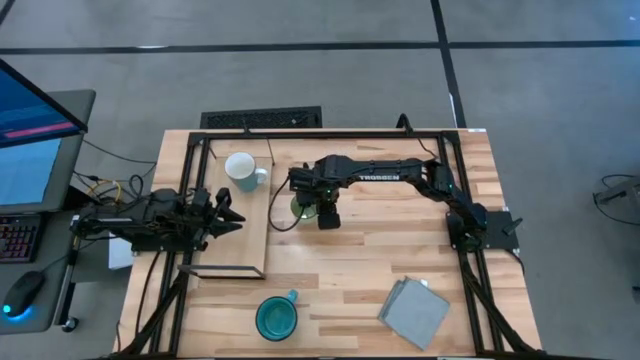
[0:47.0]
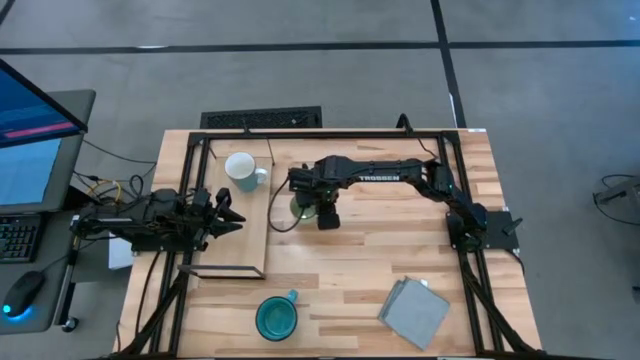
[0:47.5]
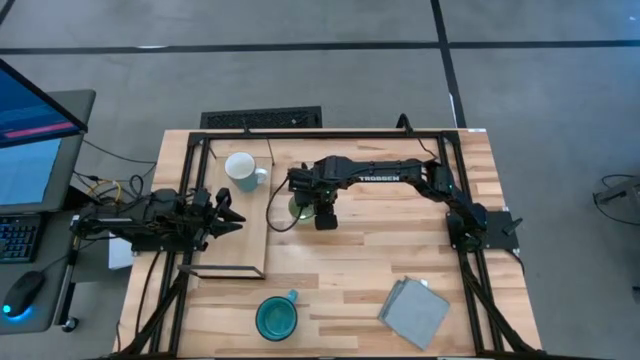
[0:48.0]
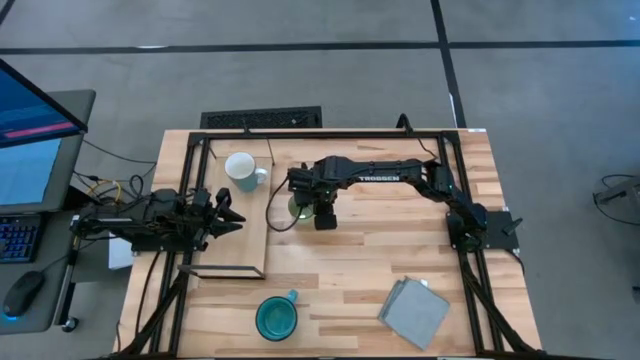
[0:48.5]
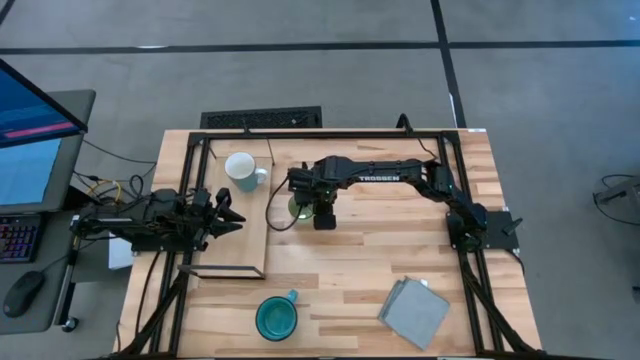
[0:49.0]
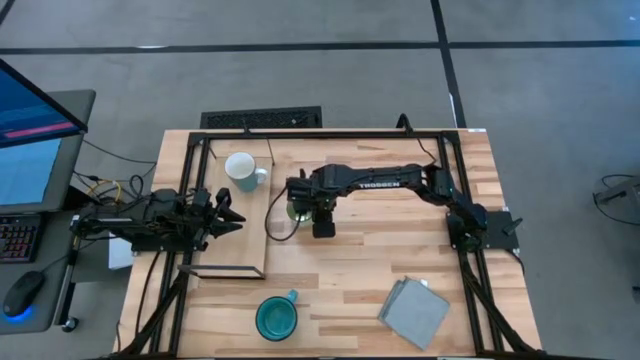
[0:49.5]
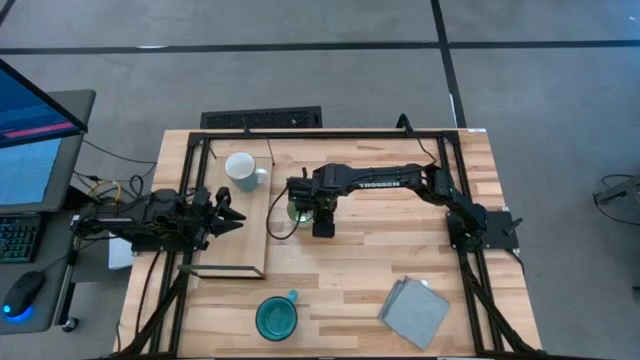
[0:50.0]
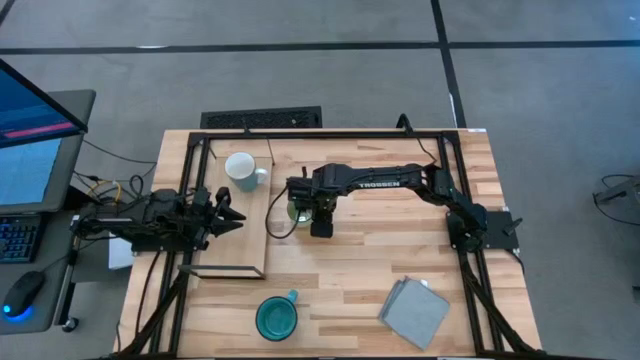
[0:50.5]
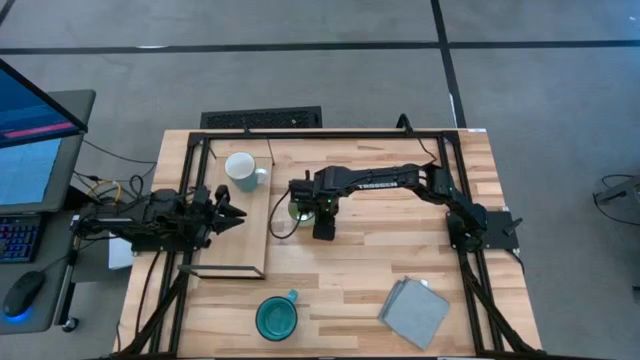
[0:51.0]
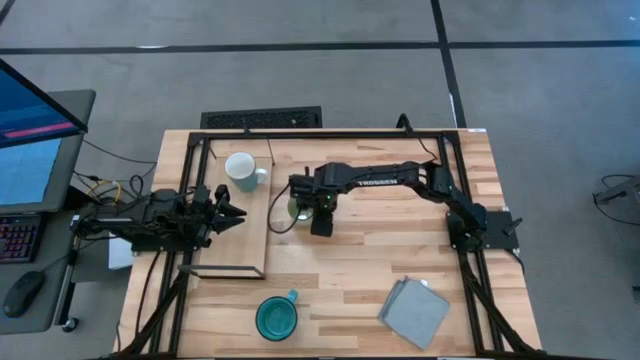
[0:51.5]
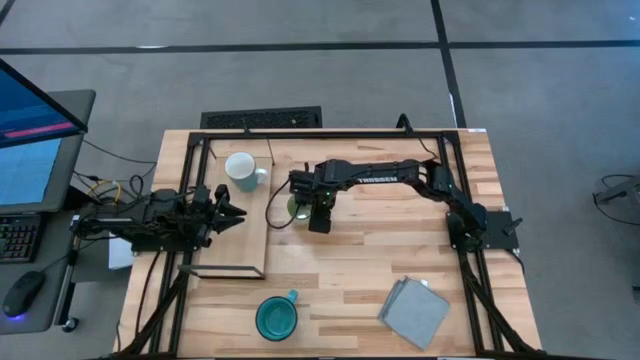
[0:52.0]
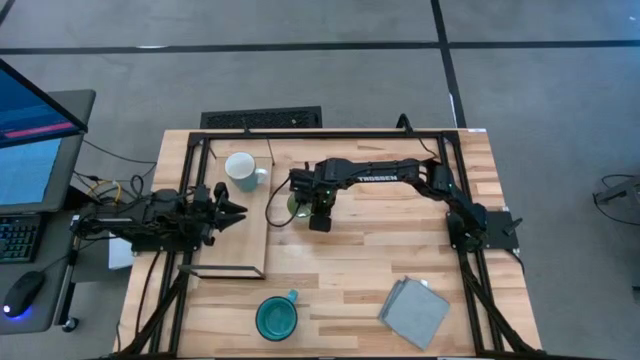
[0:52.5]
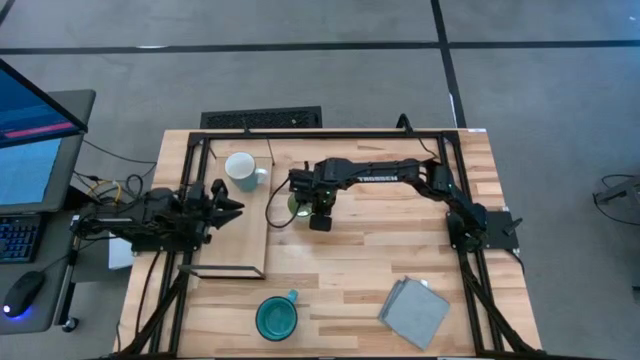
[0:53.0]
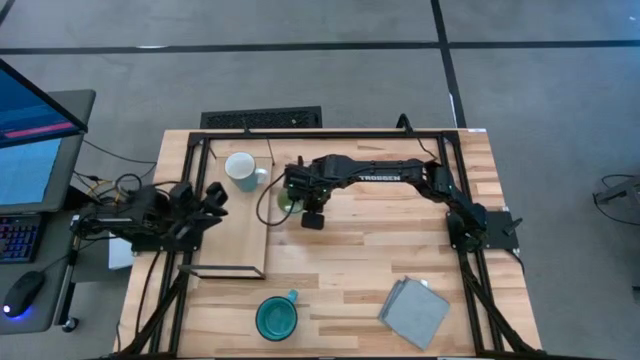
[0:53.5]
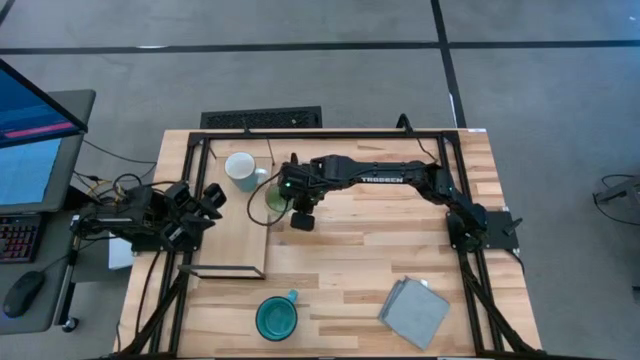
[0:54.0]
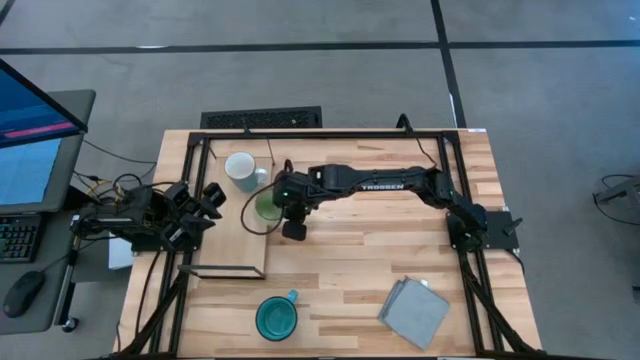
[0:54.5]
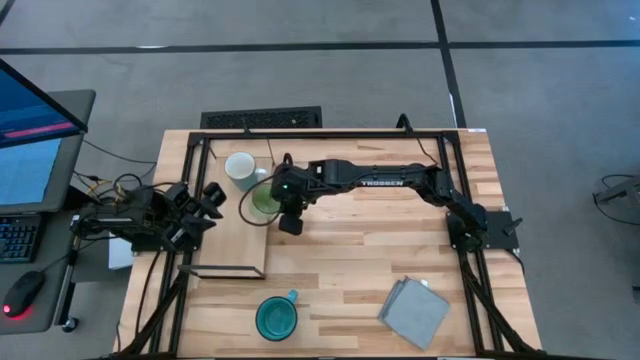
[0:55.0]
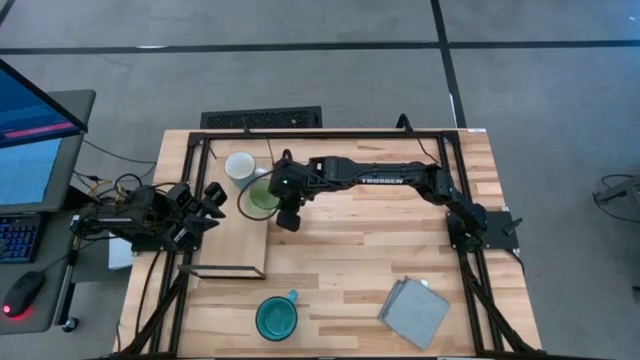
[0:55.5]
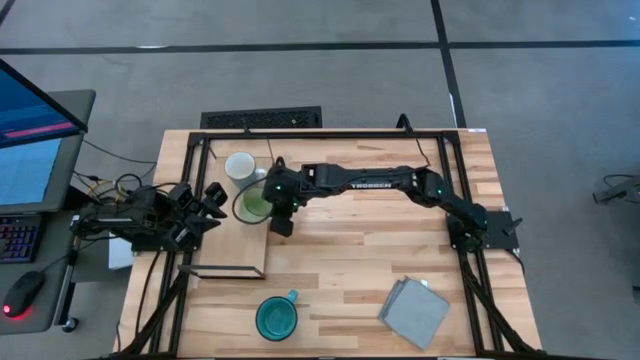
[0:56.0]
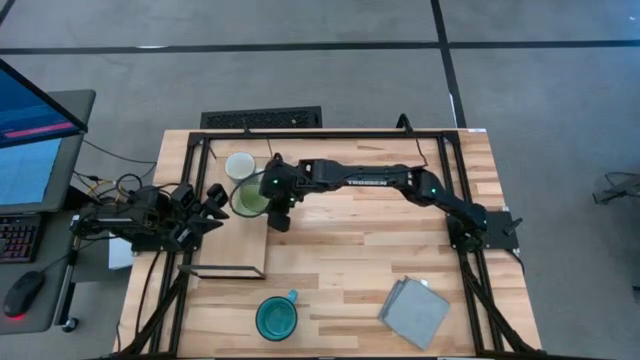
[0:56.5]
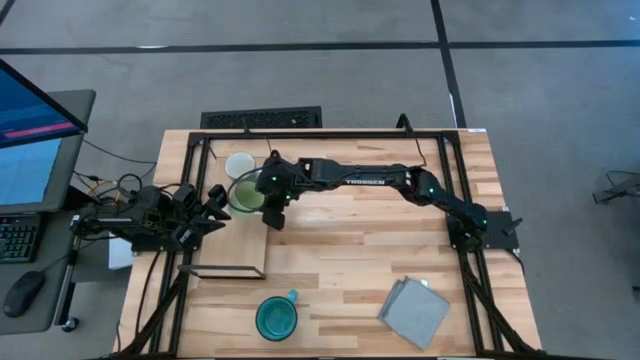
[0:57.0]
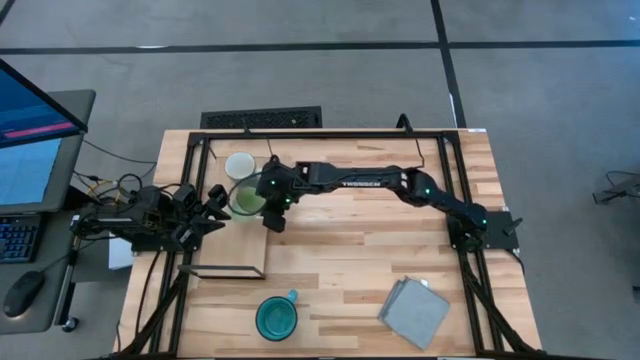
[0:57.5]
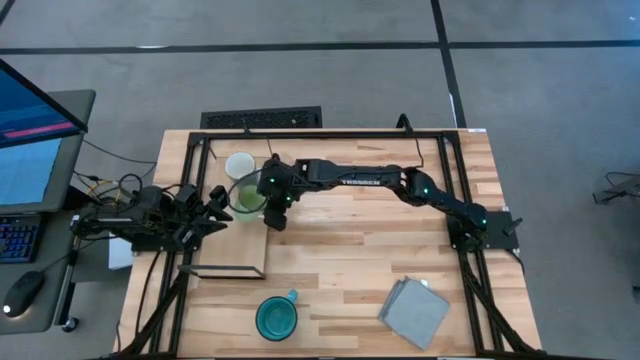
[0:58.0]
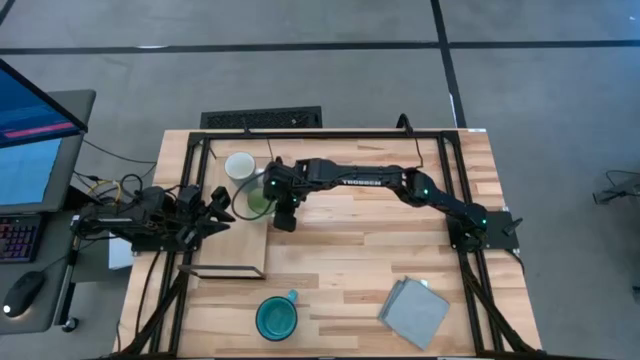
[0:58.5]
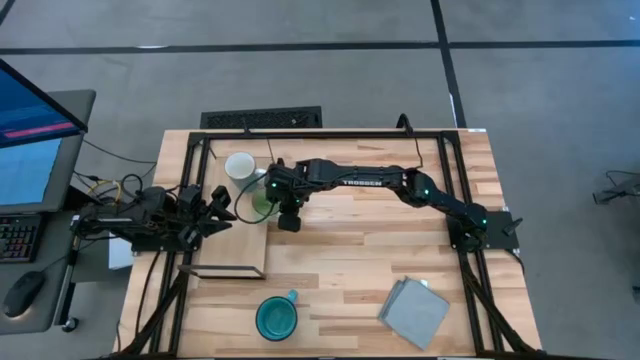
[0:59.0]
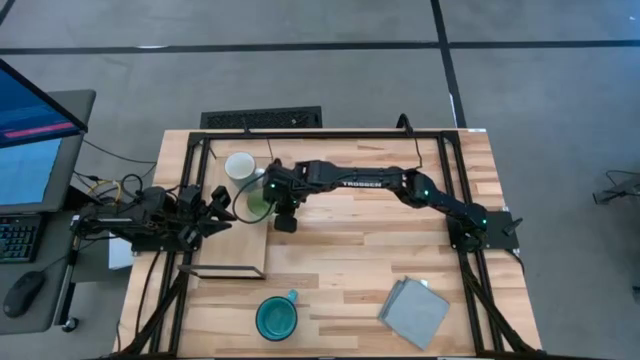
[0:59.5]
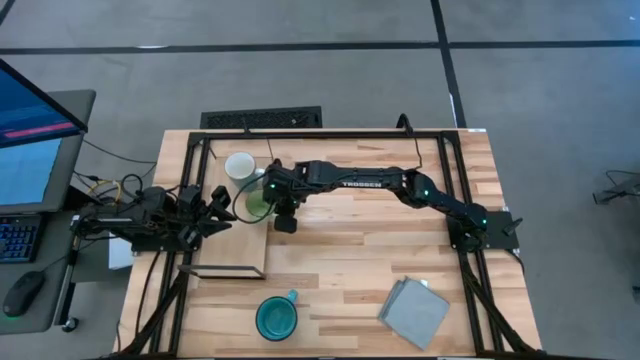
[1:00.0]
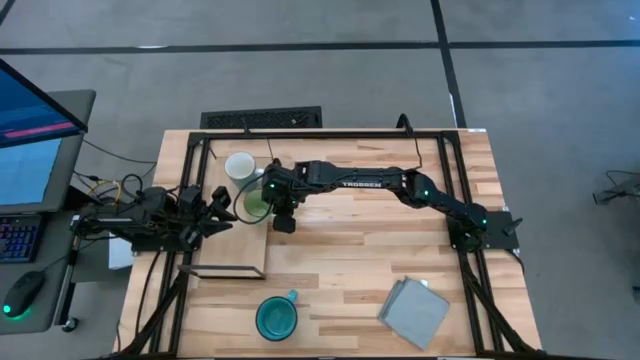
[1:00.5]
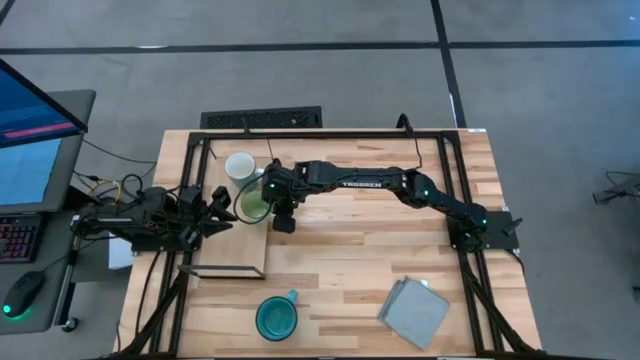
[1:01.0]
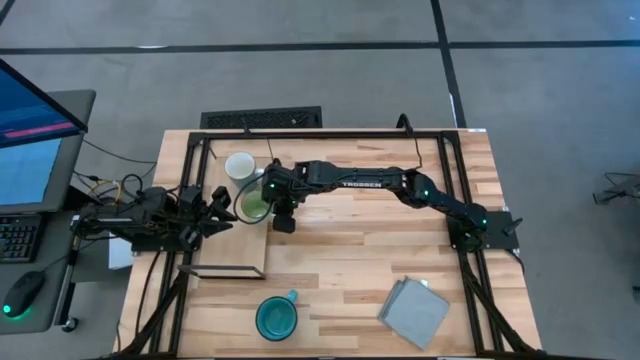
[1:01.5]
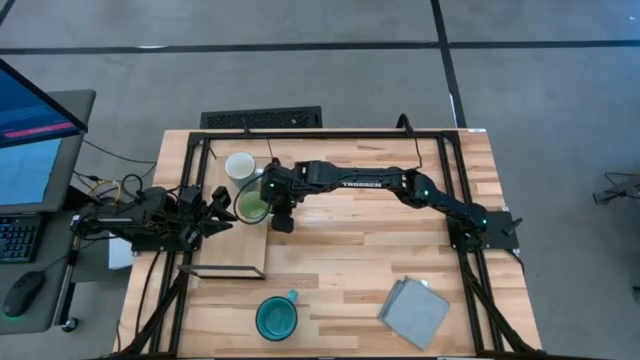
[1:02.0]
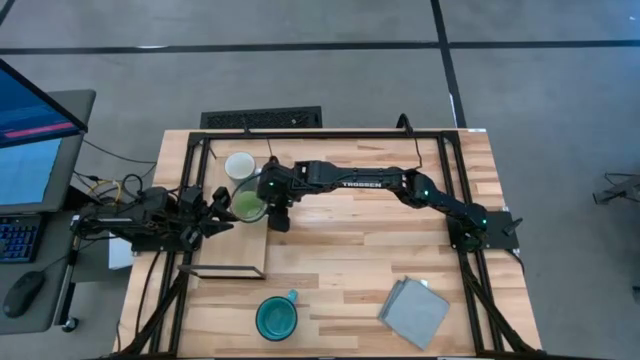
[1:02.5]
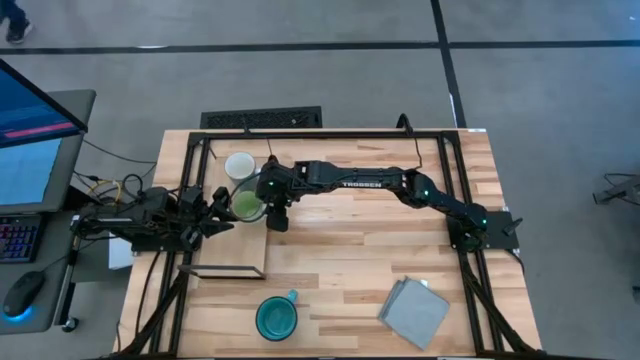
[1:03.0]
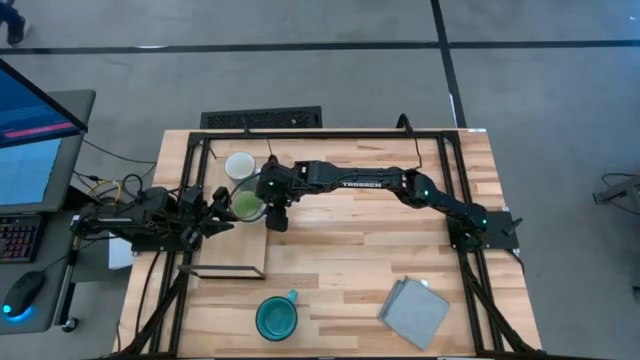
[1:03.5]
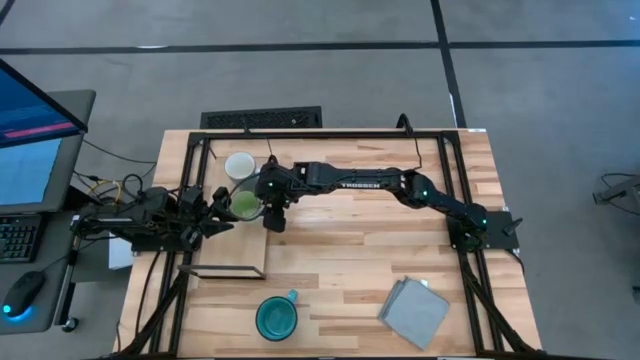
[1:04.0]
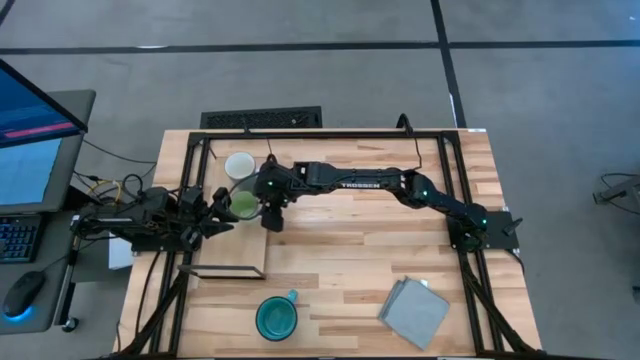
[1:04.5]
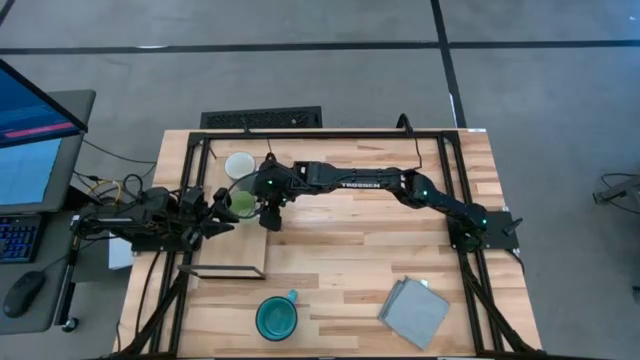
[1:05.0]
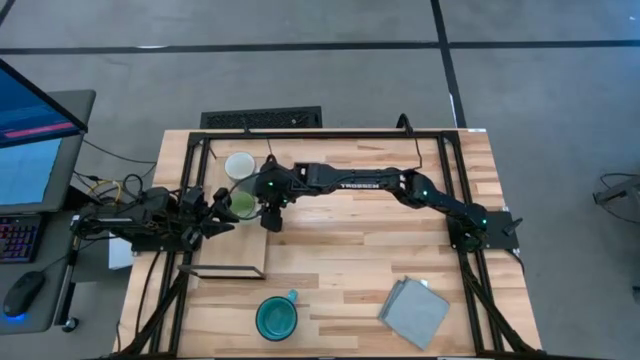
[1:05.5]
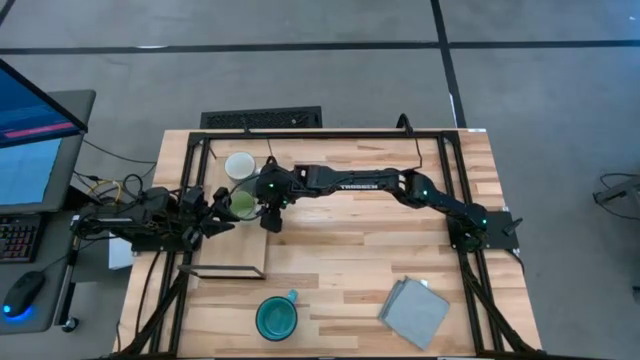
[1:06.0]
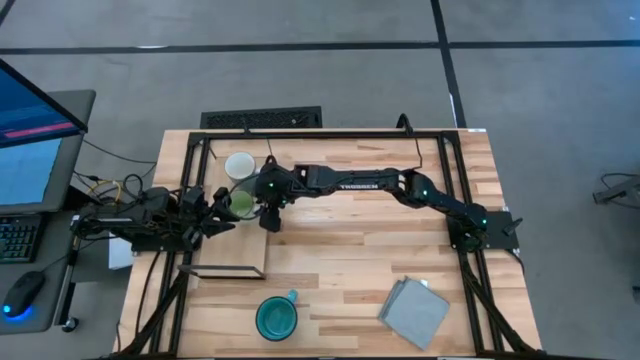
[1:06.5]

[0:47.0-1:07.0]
Task: Stack small to large cups/mugs on shelf
Put the green mug on the shelf
